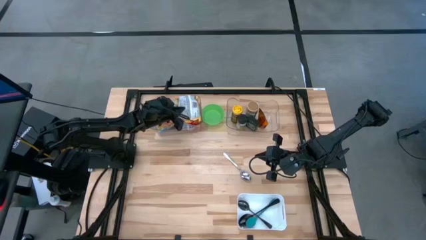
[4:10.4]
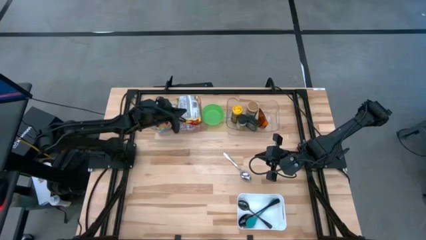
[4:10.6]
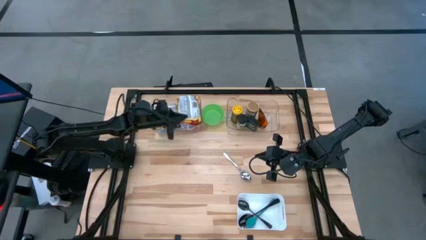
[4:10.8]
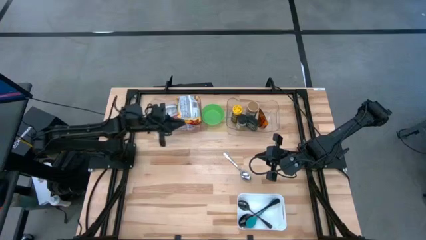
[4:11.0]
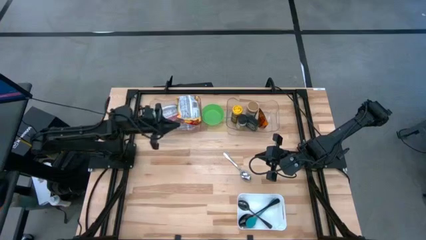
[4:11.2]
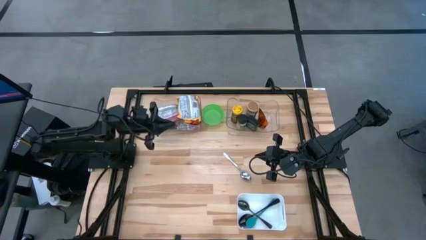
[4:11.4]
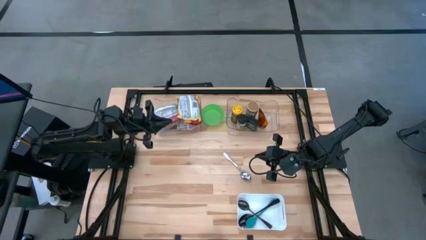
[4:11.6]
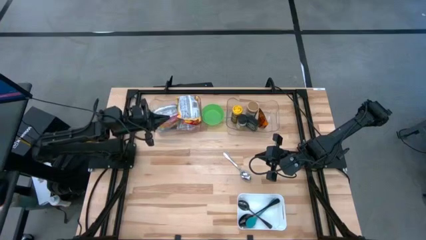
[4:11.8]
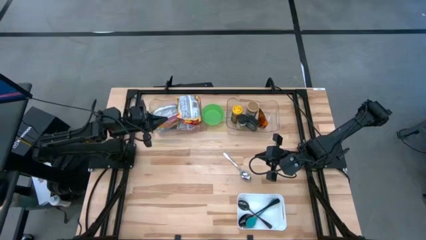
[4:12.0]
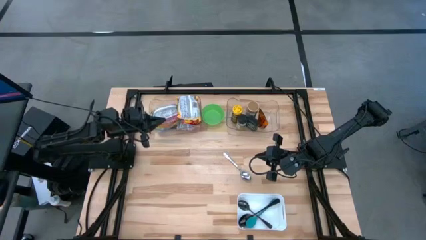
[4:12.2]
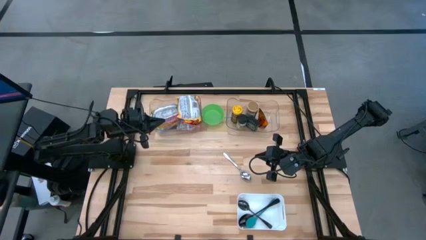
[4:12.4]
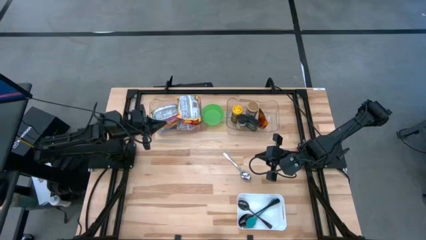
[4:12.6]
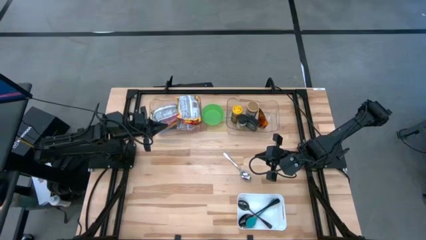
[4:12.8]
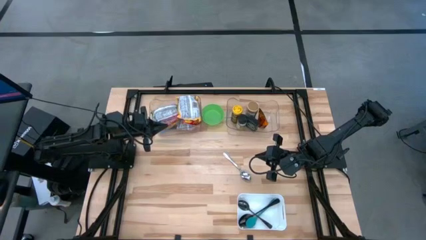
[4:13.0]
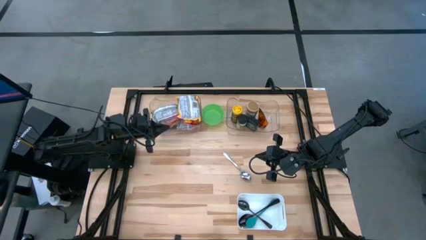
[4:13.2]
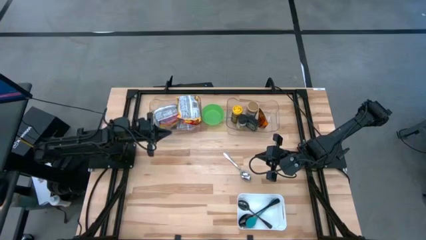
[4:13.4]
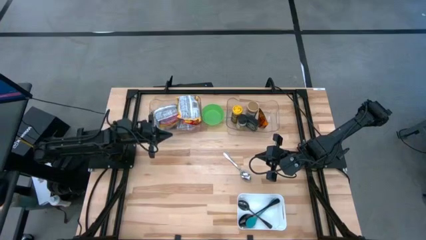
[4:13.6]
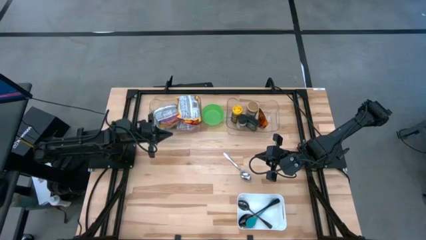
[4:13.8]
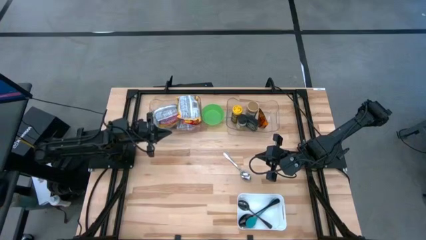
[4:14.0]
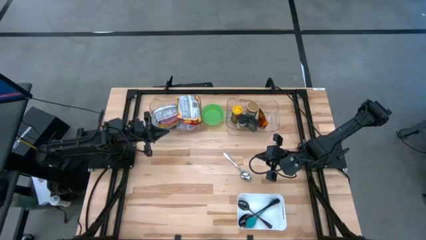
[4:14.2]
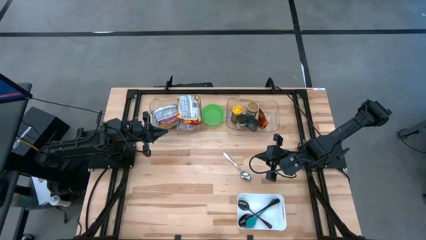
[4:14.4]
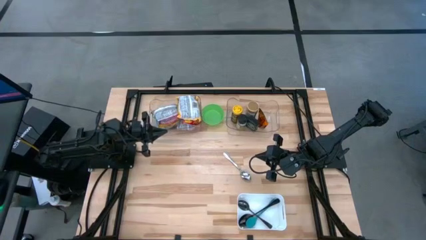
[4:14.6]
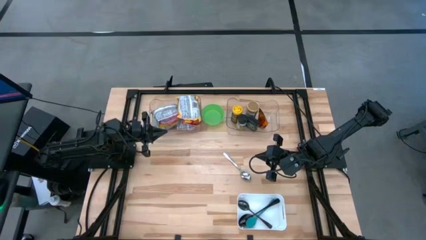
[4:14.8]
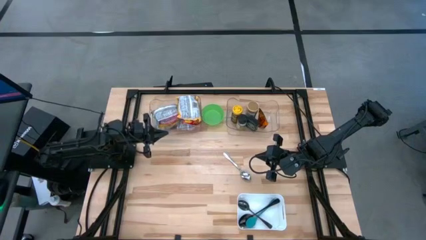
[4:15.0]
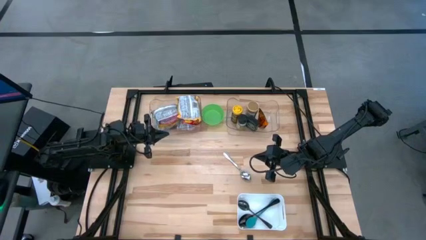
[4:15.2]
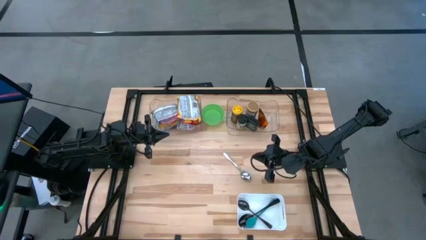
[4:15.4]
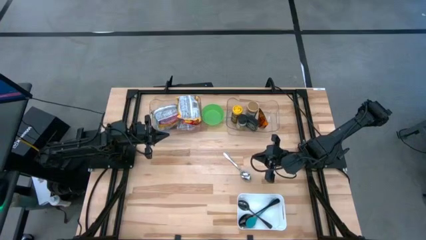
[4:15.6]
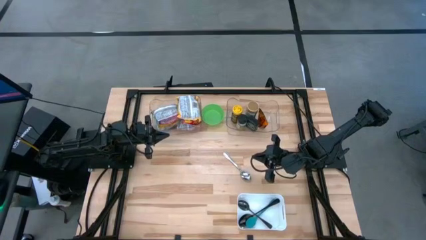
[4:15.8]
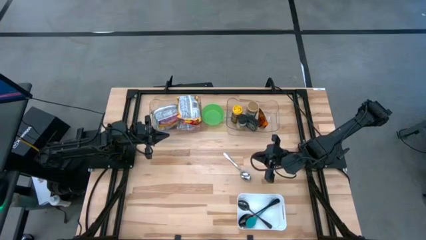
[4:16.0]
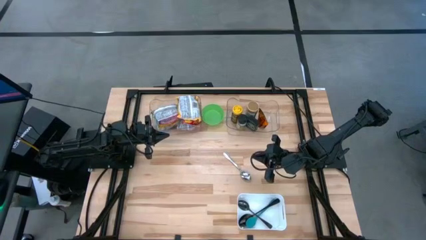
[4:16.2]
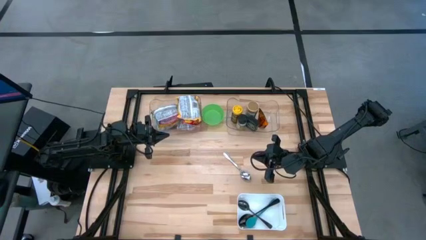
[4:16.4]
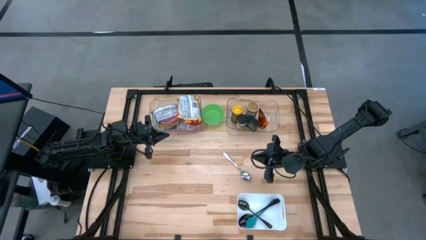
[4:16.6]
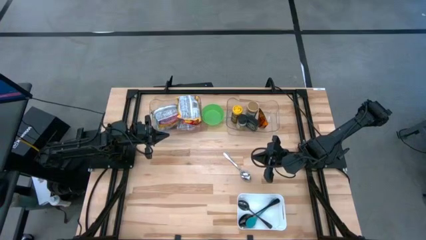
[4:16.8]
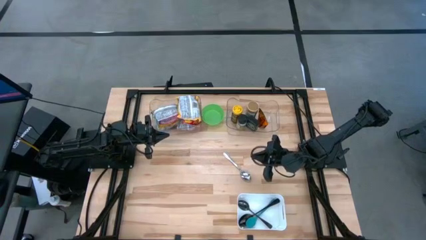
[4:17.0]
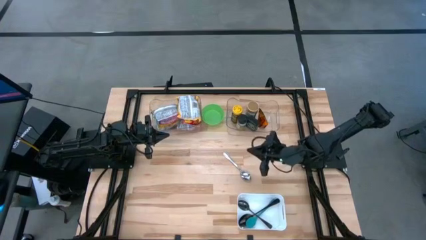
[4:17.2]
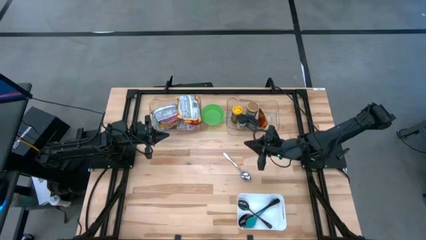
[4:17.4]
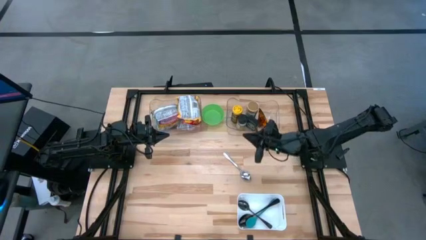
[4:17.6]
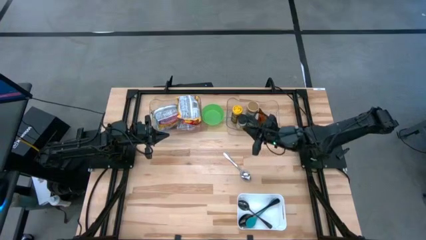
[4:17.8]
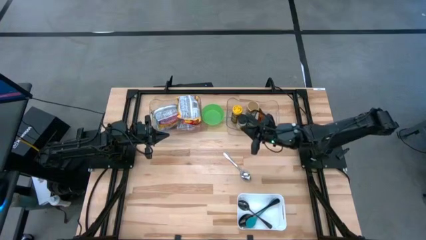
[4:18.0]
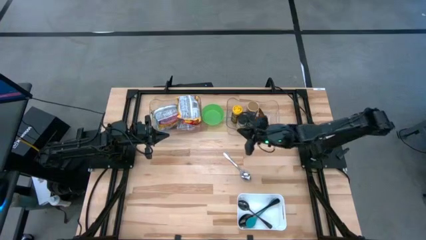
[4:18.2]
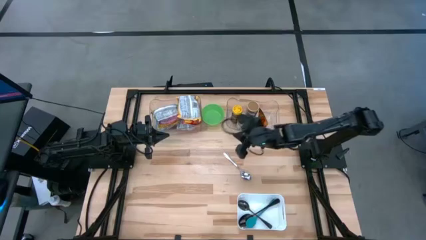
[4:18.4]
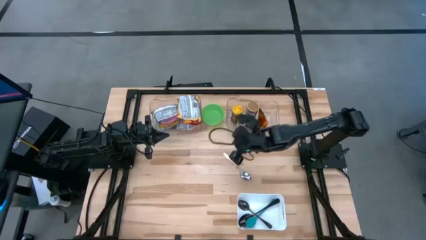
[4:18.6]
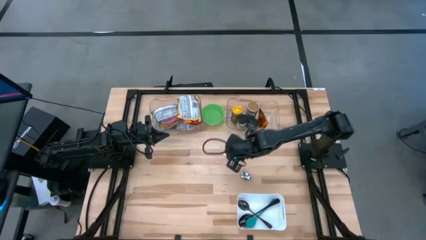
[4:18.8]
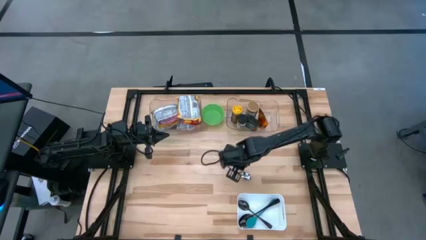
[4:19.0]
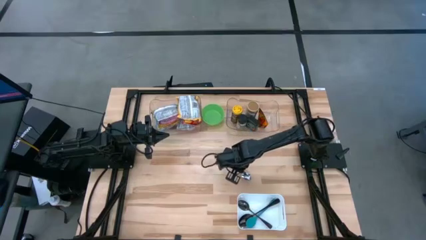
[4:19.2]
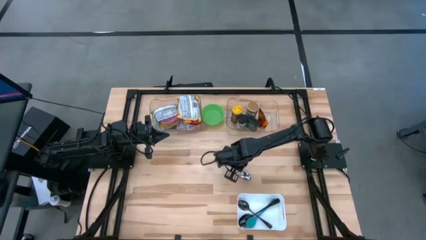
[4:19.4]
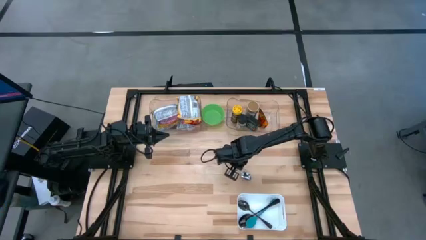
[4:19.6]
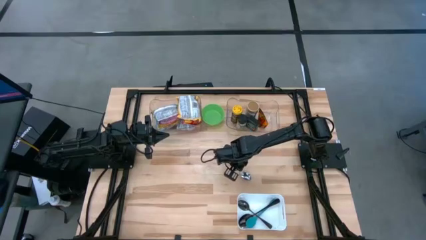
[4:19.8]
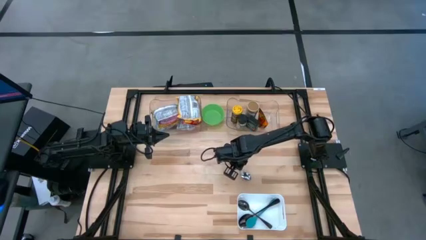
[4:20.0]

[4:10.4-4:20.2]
Task: Pick & Place Food Item
Put the silver spoon in the white bin

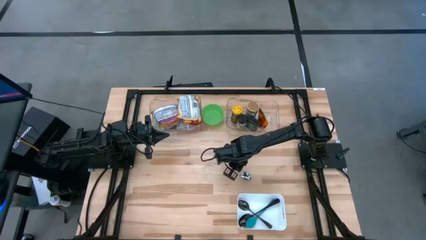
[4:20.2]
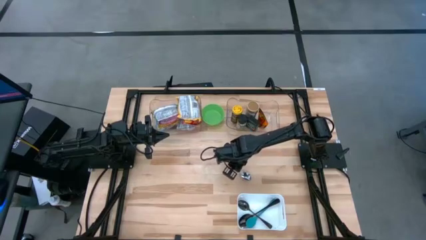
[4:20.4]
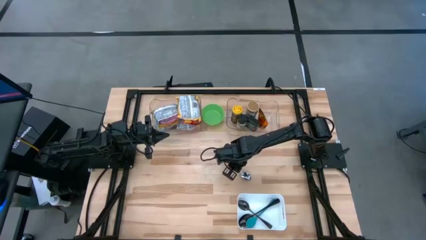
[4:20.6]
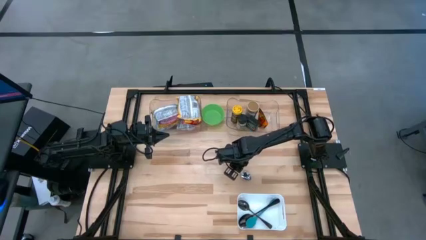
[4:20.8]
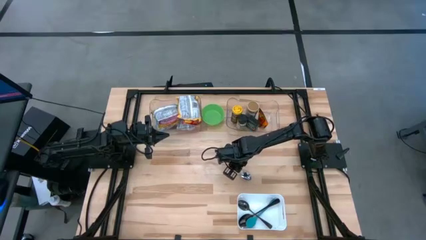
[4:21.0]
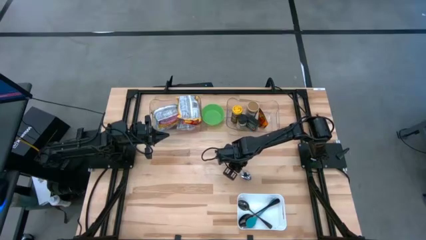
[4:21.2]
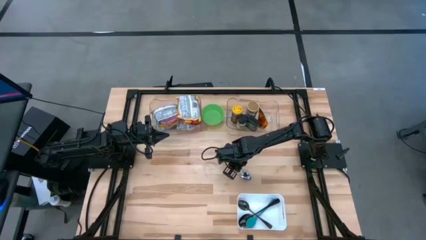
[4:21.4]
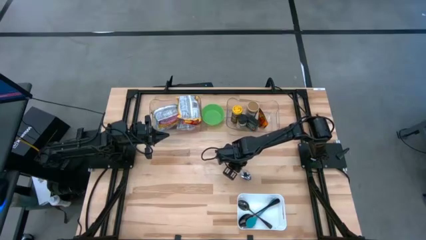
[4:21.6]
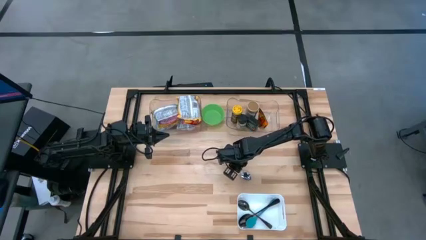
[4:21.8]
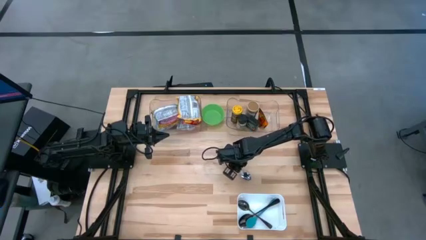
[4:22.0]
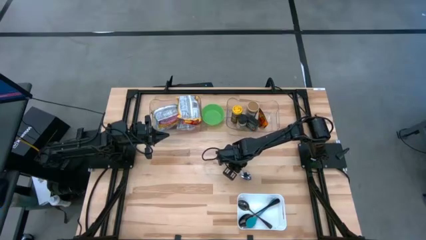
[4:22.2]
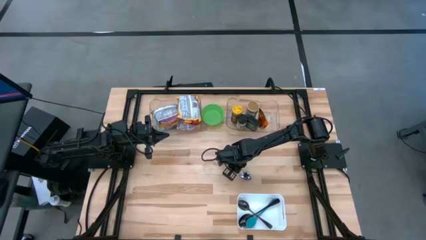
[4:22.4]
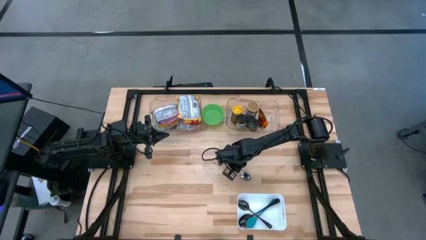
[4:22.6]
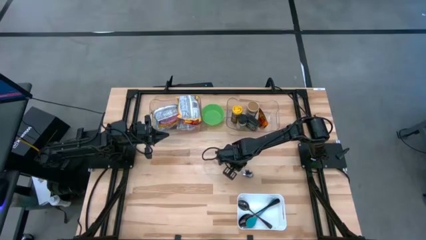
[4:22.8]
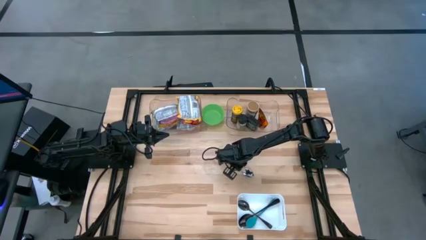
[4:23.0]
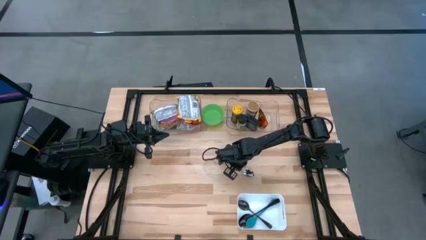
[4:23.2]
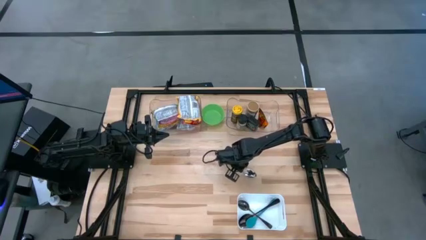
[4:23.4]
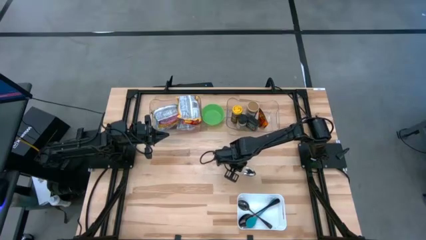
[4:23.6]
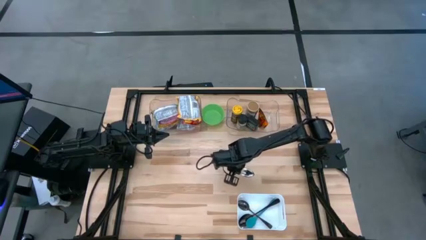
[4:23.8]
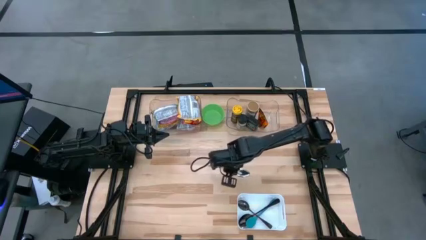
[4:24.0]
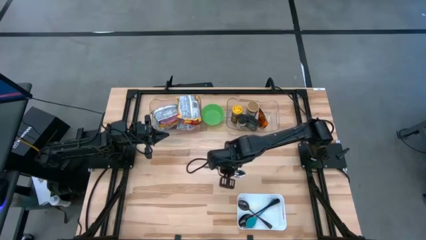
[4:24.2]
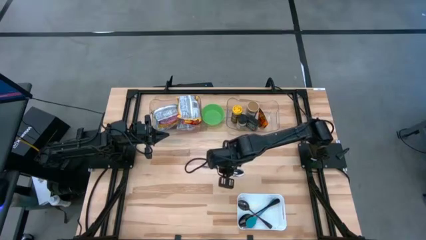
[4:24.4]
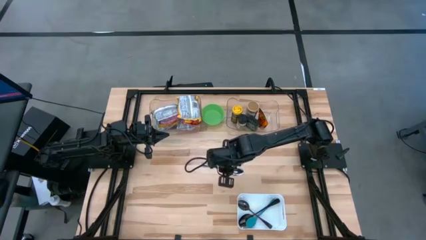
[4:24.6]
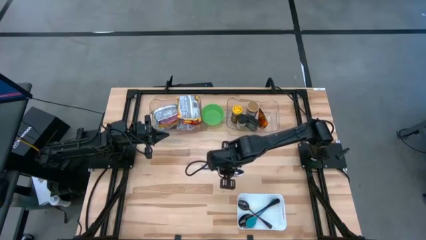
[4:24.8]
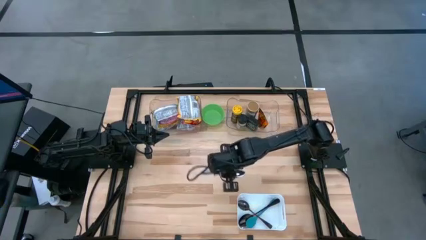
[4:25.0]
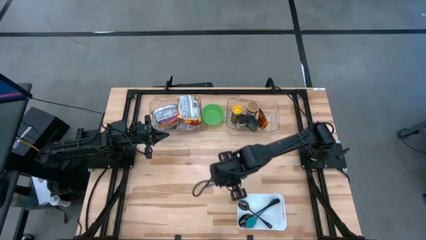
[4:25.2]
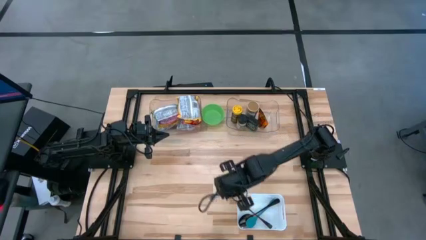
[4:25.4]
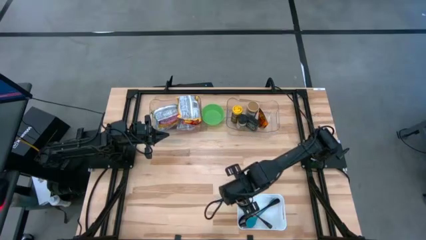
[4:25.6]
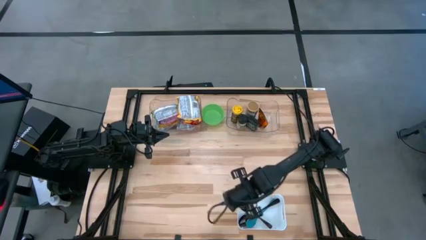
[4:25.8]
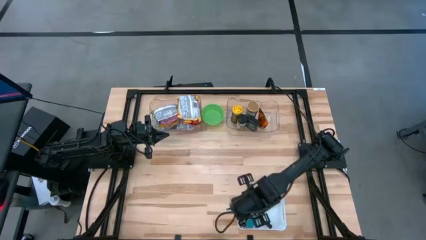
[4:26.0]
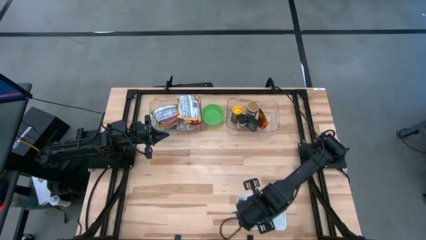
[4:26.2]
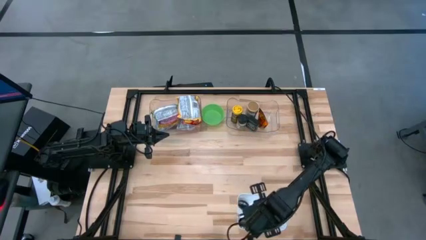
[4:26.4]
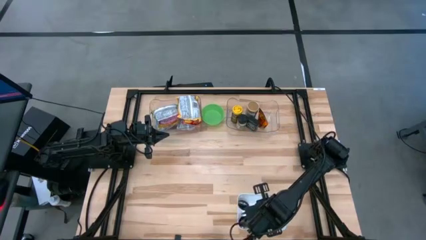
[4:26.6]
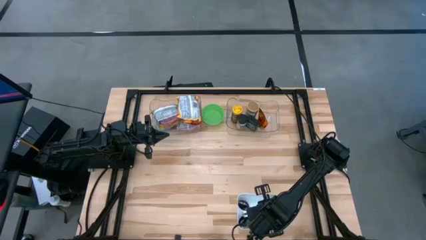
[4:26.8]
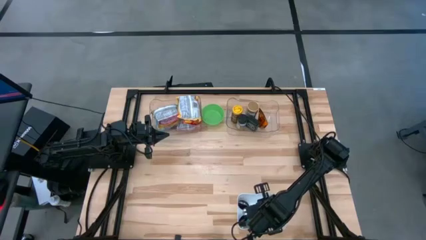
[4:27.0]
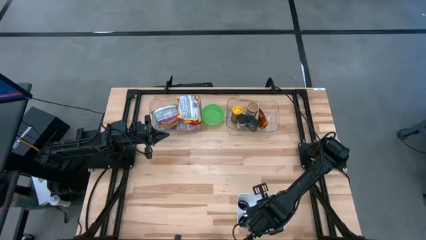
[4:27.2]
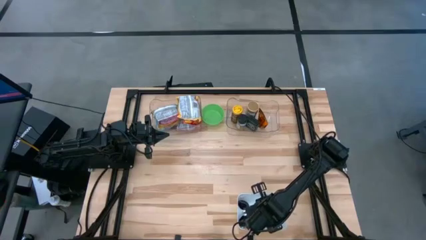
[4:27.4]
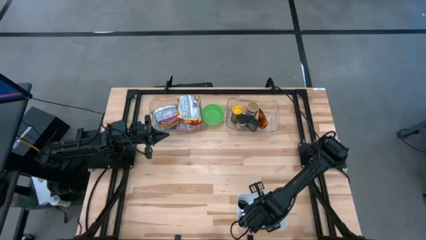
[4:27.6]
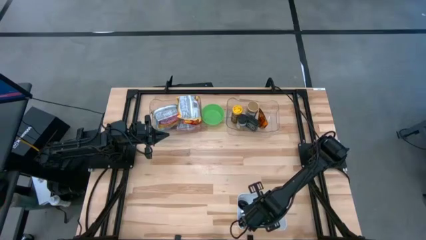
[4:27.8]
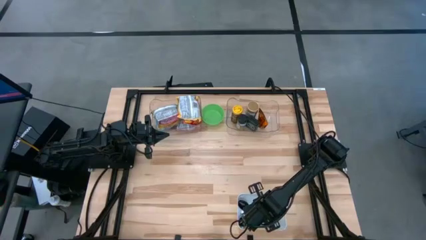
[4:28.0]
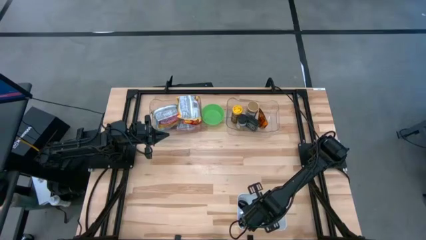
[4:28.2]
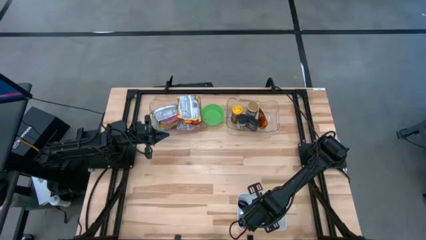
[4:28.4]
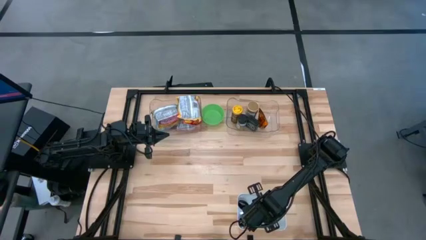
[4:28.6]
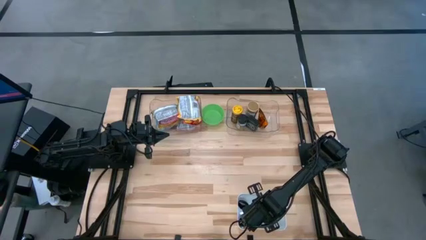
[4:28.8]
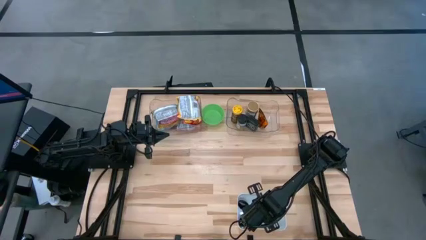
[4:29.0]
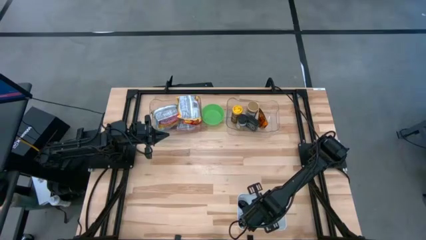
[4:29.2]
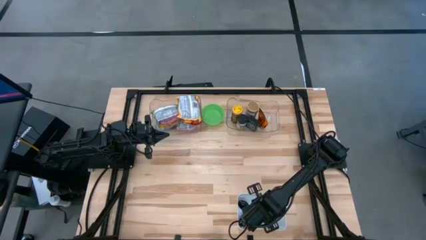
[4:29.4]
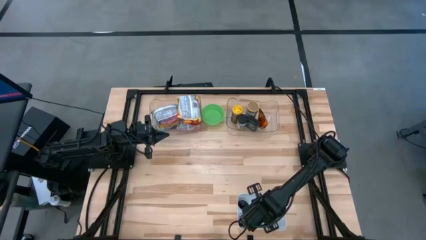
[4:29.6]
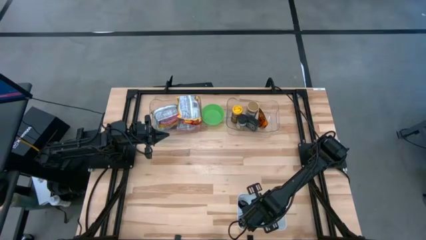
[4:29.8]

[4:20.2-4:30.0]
Put the silver spoon in the white bin
